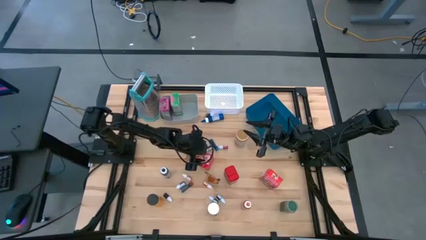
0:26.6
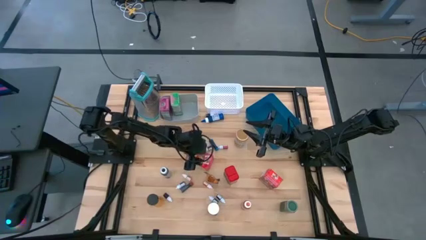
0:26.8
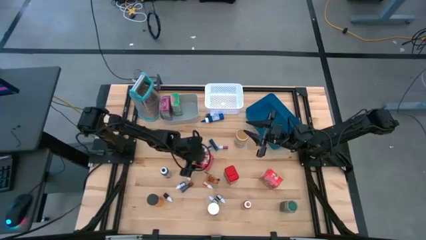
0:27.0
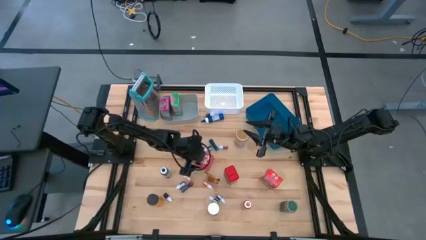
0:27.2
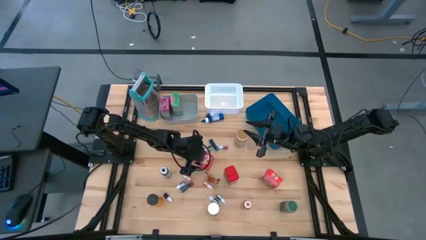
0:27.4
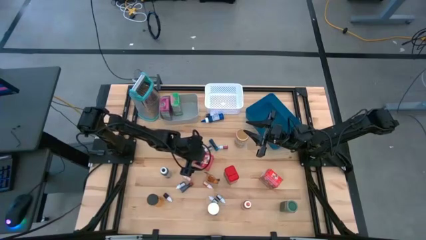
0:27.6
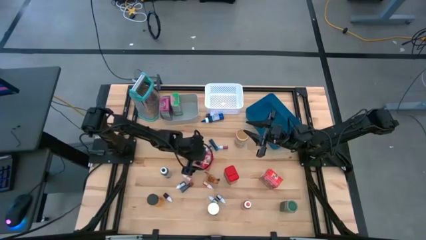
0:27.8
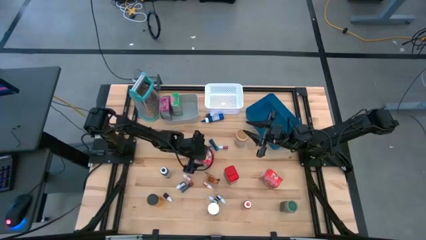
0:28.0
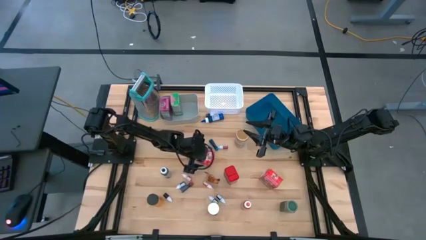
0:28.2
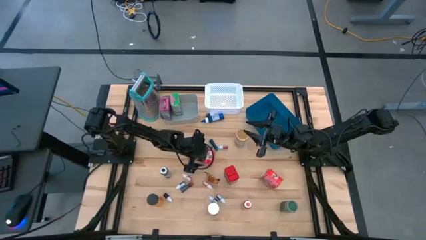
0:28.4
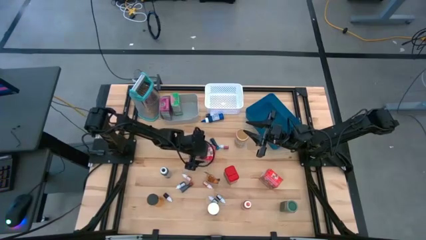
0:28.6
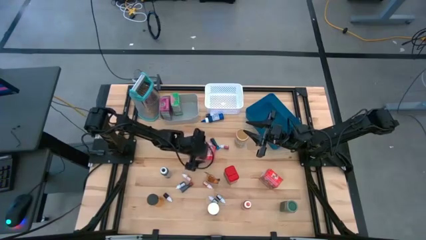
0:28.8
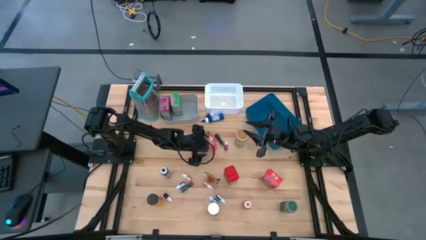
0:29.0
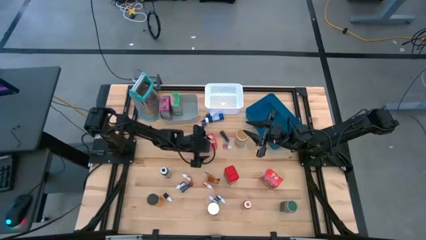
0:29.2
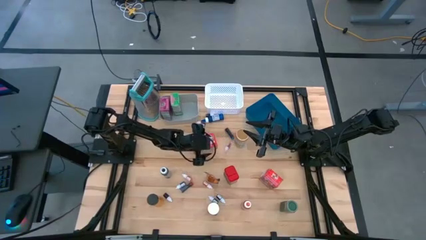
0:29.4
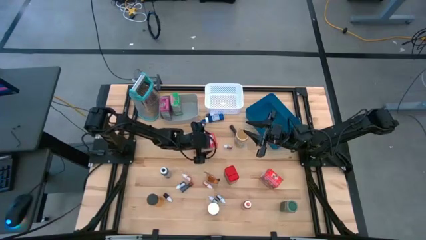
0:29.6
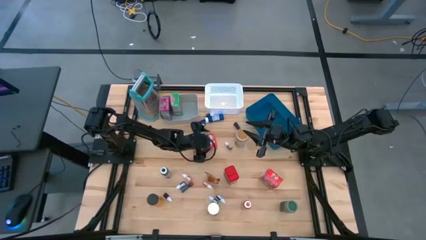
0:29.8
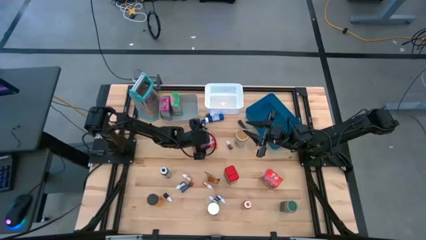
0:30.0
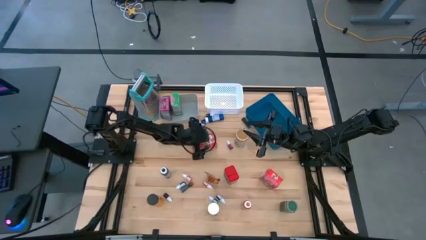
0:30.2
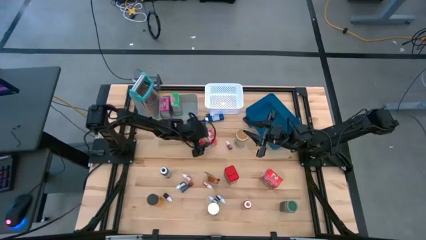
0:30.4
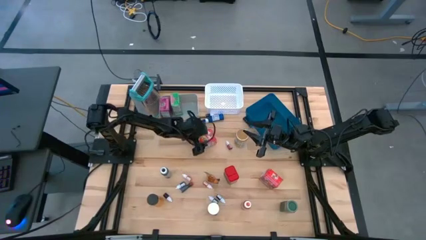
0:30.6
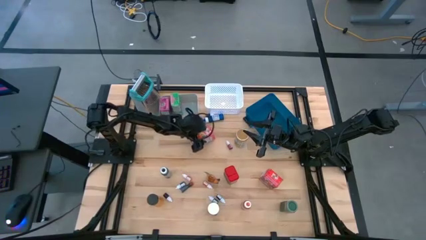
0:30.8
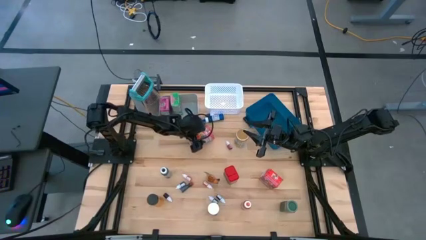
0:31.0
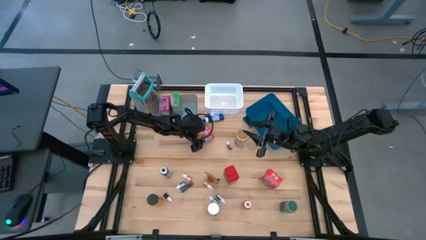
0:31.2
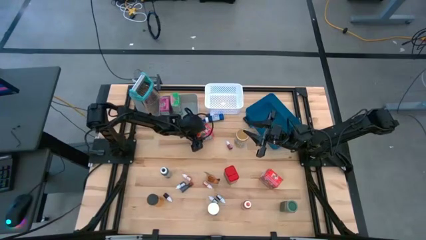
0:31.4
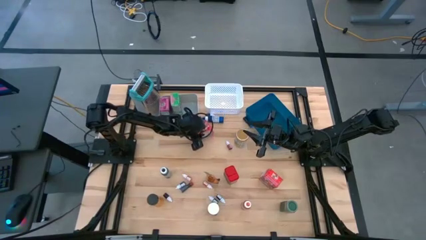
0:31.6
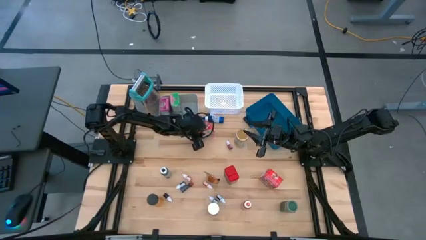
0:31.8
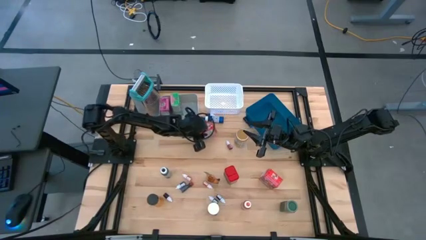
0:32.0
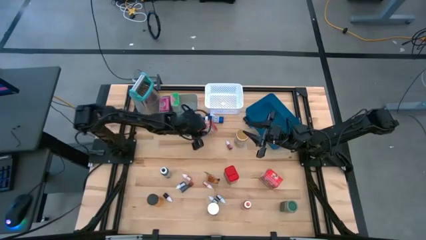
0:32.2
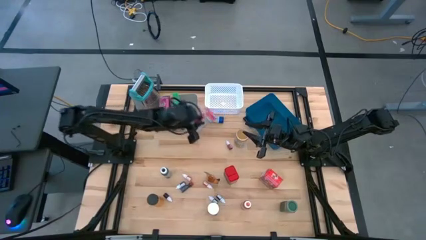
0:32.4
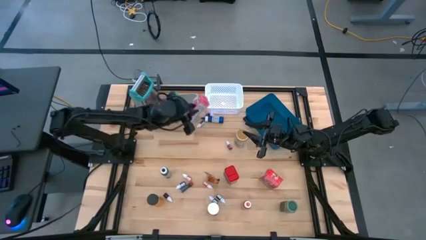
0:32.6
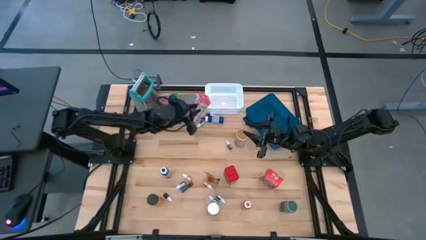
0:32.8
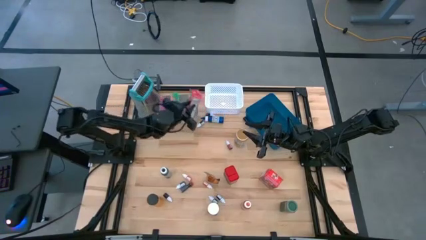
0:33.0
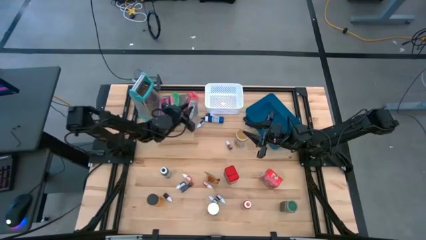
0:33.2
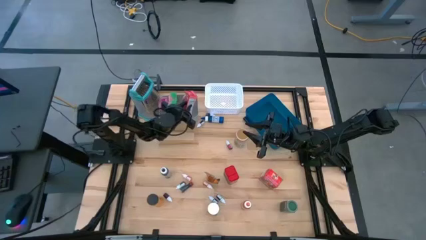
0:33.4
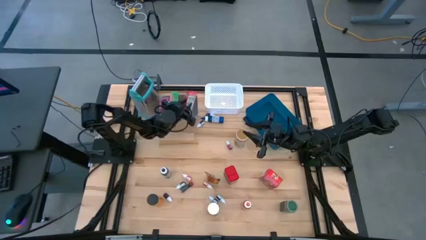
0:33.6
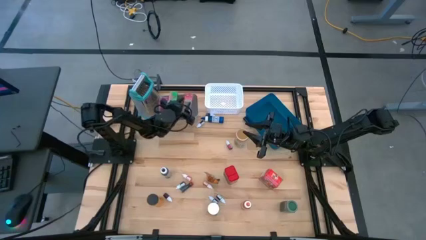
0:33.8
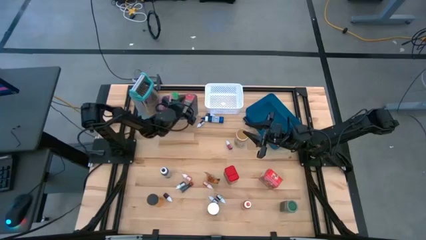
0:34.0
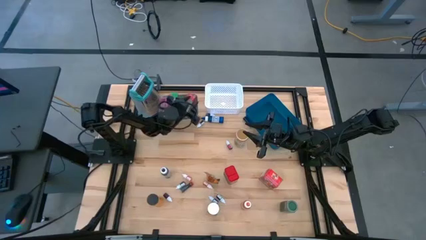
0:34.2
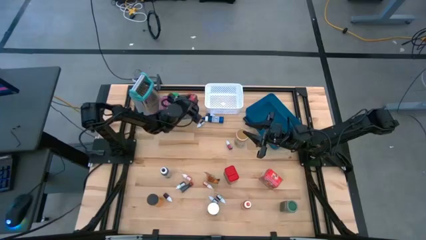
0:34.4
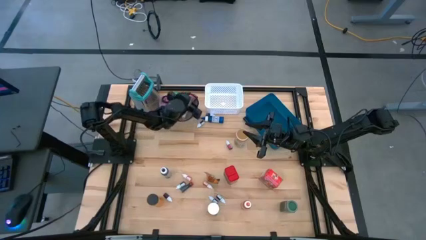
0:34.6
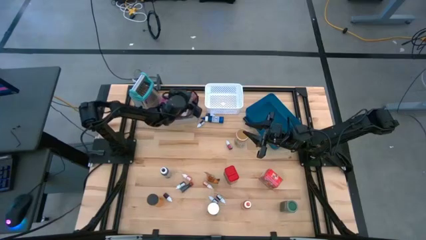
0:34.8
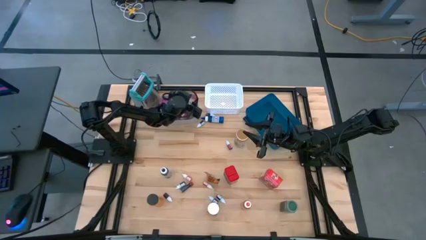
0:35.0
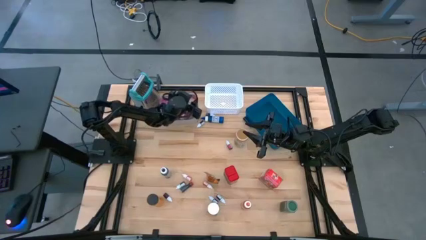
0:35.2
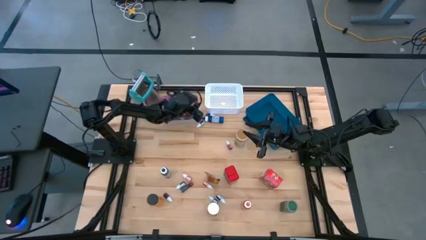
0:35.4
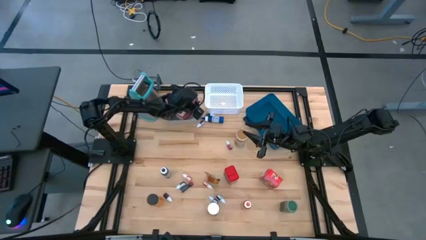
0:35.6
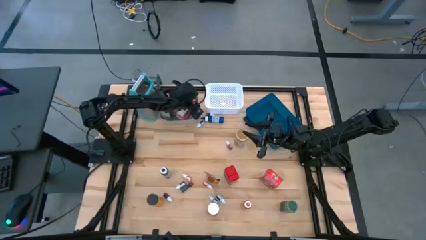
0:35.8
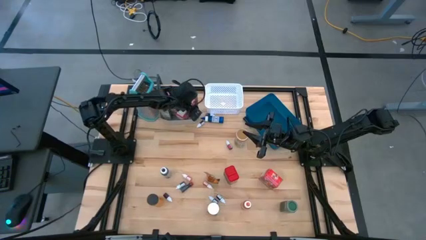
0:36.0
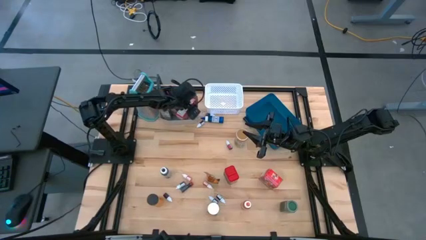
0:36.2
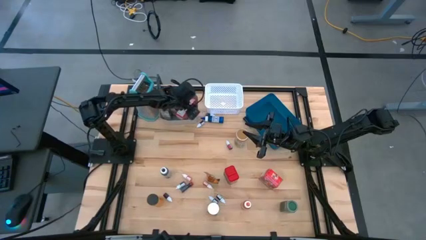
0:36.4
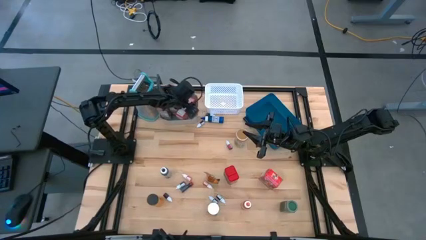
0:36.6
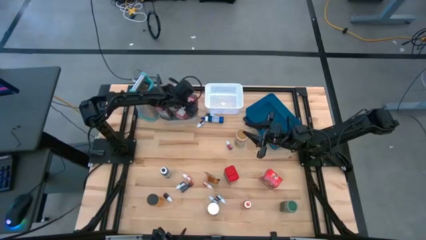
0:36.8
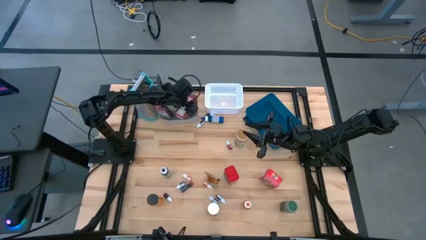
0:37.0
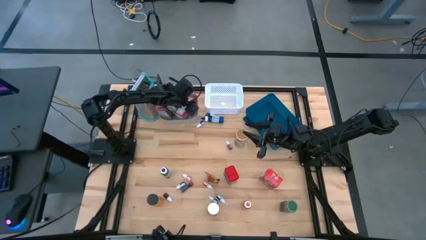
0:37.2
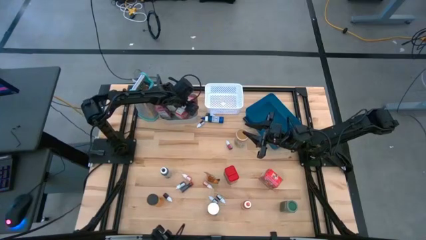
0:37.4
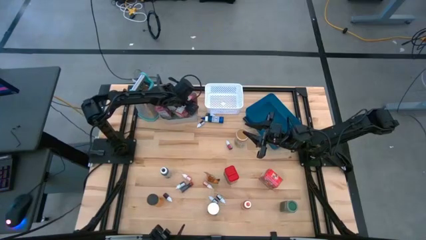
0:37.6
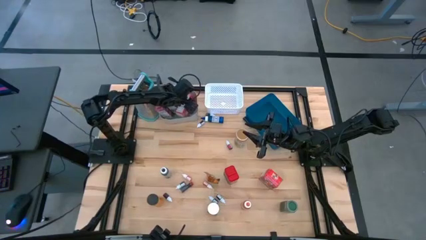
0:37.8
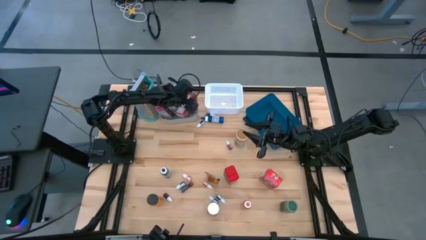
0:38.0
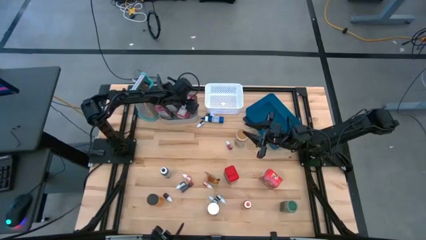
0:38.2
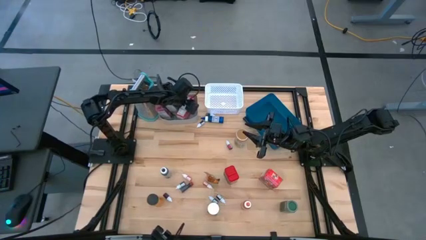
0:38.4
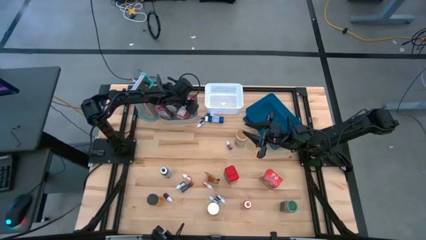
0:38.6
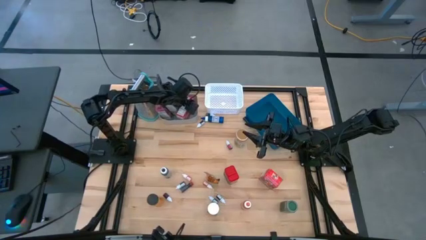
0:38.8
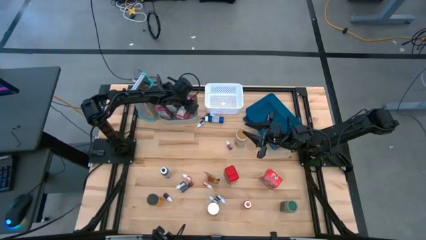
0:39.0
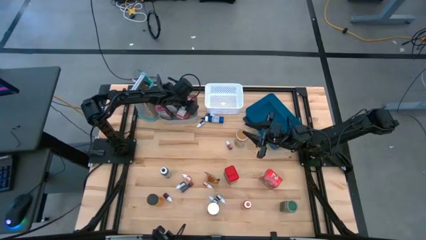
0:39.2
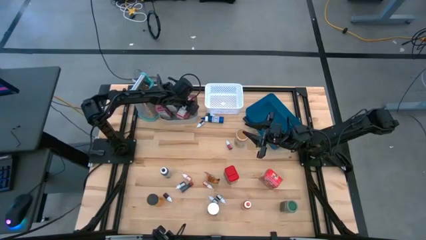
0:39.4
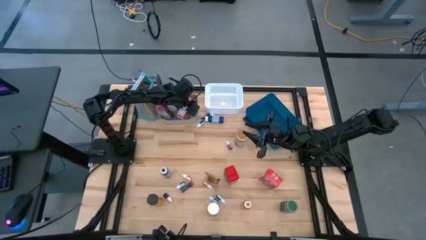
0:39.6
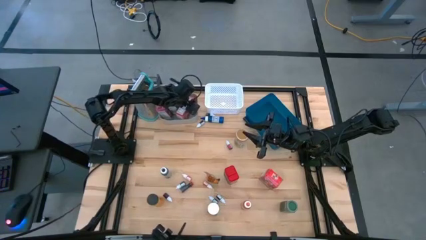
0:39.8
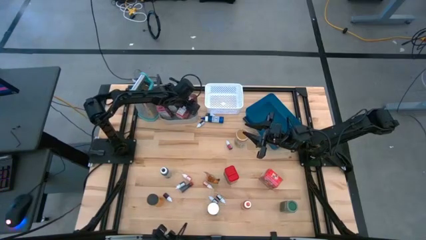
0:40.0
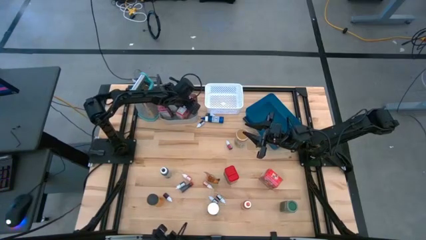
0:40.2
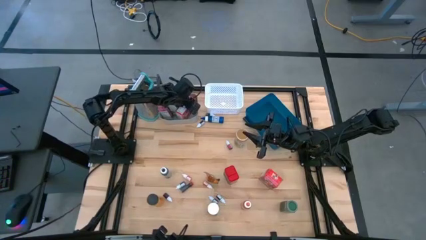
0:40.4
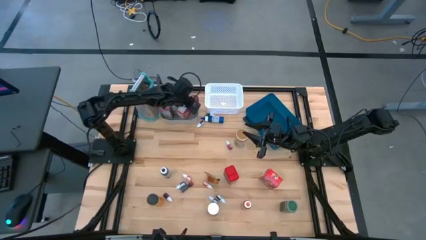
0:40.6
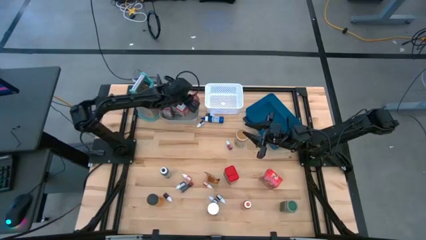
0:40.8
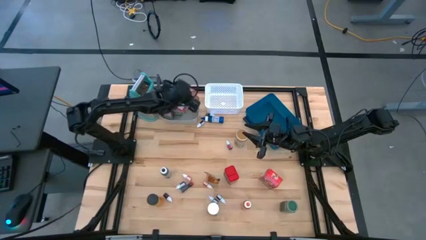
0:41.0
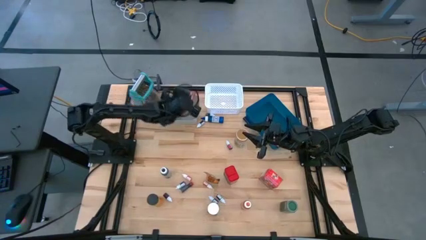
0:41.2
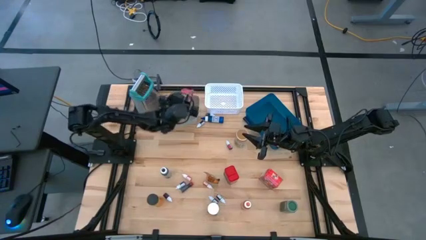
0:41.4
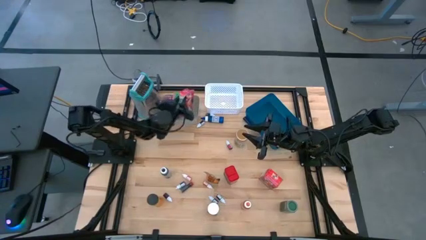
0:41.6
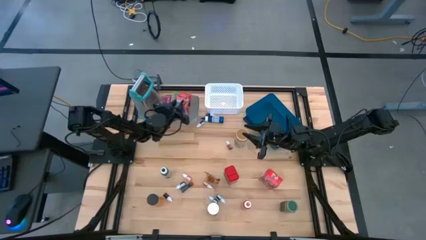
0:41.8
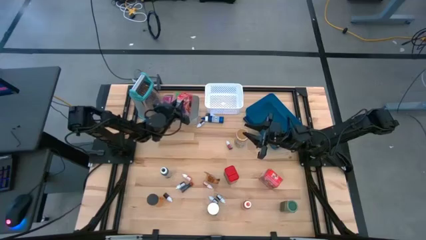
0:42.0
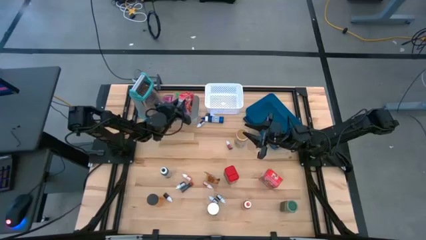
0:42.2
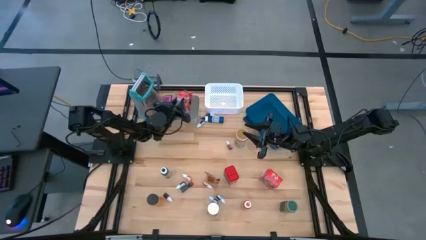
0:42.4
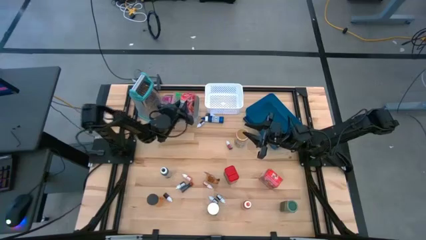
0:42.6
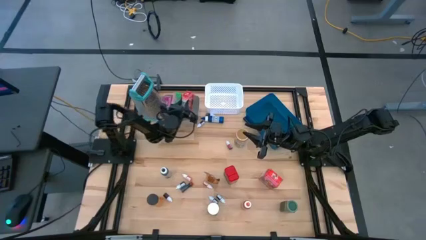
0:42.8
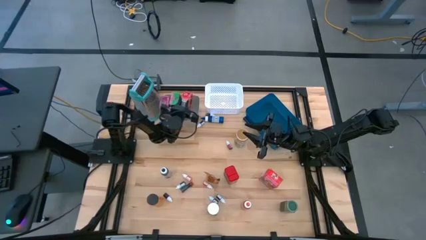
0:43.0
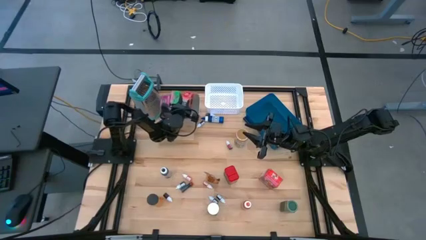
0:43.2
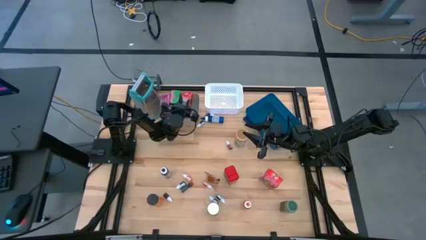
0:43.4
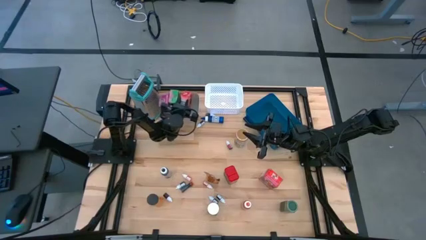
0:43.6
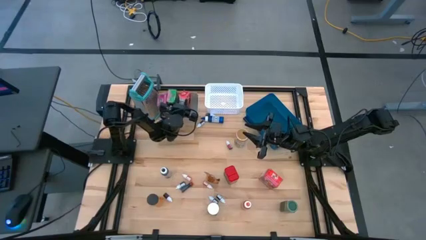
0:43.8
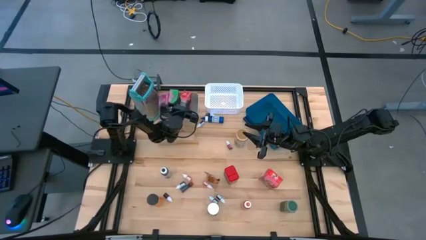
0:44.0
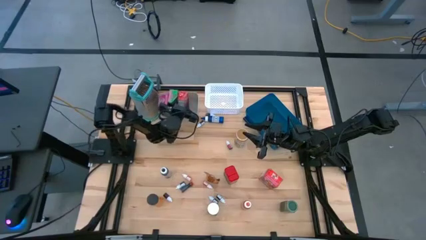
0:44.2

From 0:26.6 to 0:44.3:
Task: Pick & Place Kitchen Items
Put the left red cereal box into the gray bin
